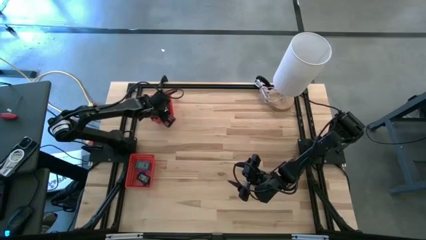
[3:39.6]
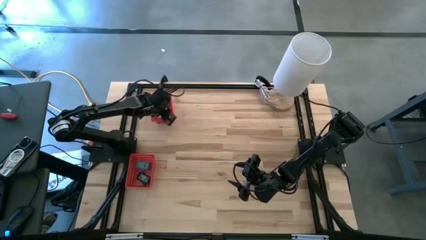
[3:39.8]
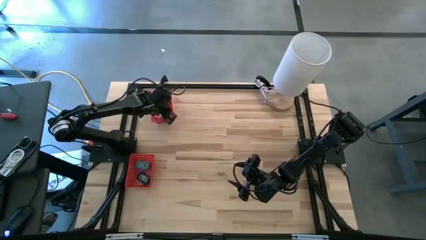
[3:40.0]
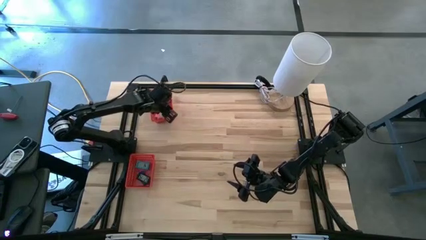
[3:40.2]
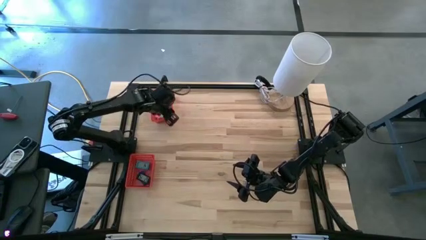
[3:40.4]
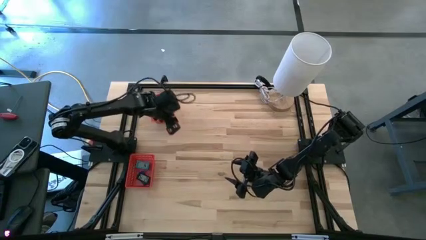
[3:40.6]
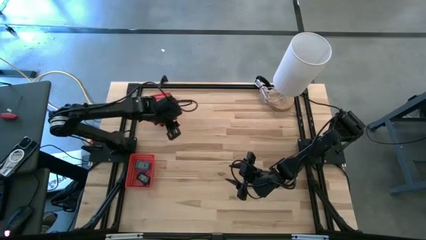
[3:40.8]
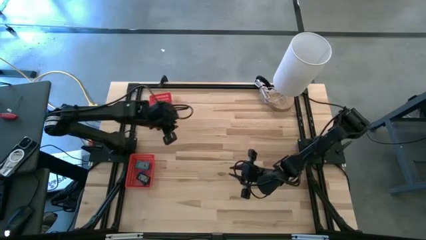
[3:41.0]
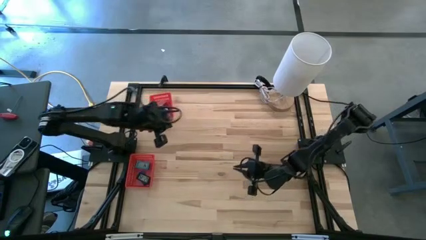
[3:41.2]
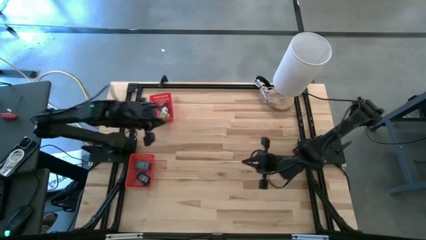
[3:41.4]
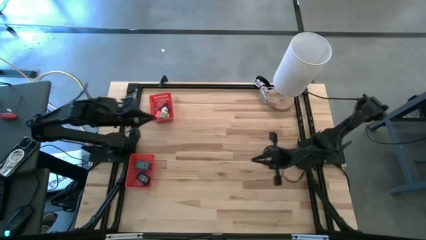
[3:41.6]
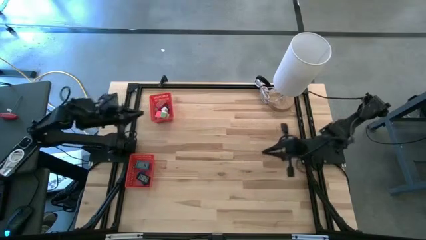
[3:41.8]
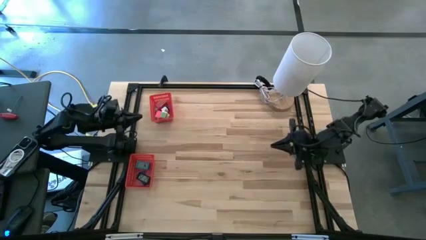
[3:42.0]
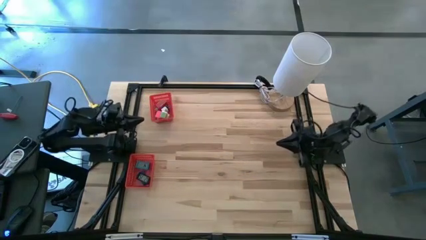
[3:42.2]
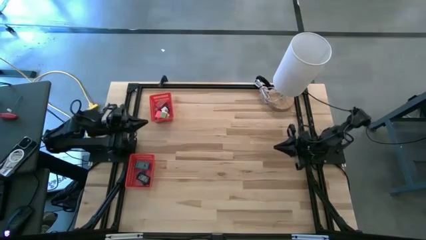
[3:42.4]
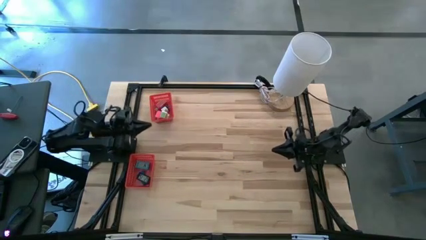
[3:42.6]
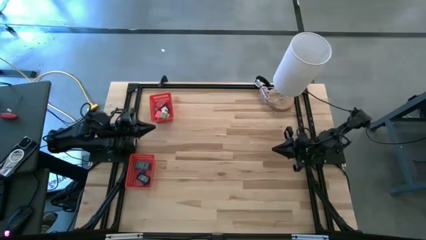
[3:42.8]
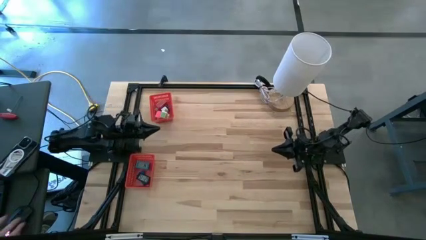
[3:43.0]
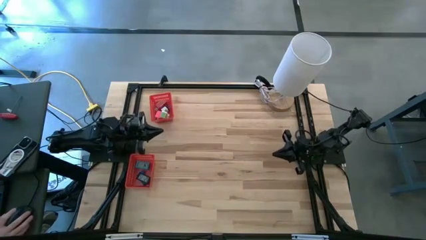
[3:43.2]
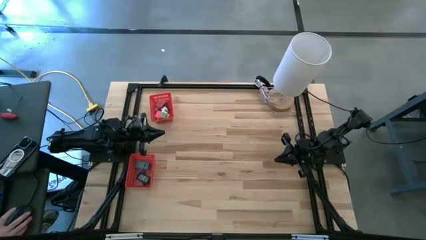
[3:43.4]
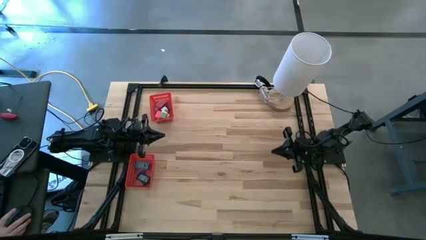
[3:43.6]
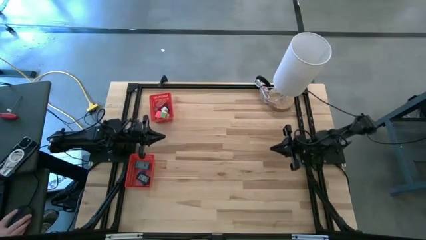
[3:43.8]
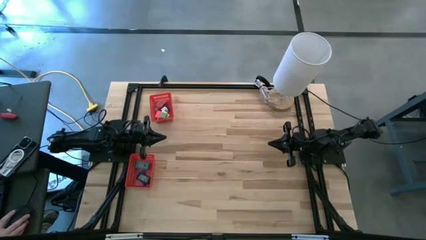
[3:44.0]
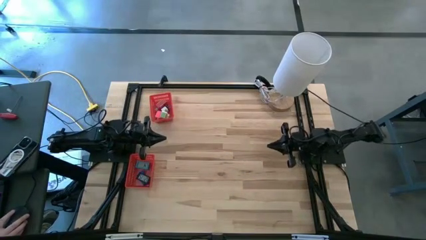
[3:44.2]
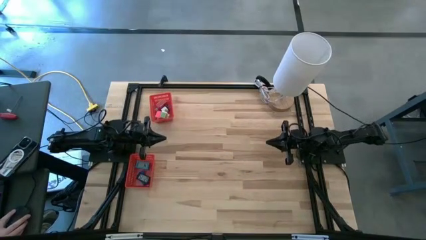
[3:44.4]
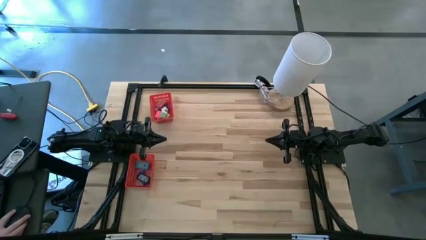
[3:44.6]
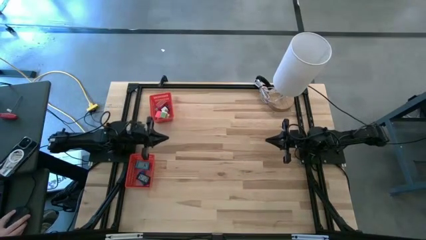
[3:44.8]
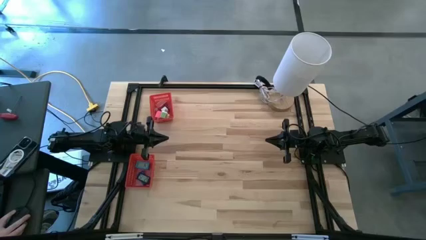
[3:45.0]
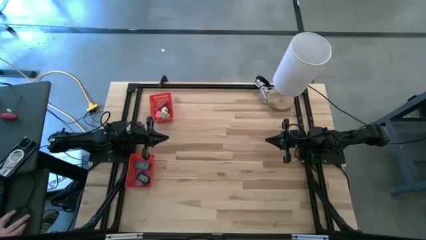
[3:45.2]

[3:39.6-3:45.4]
Task: Pick & Place Office items
Return to Home Position

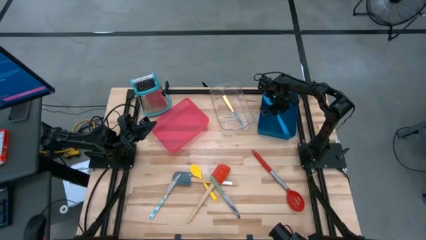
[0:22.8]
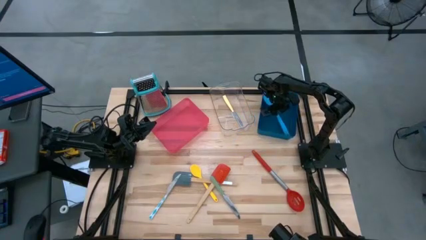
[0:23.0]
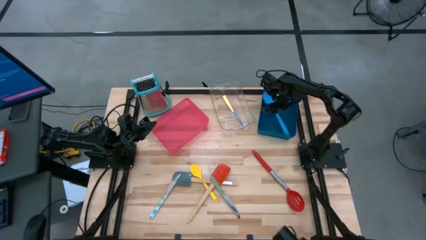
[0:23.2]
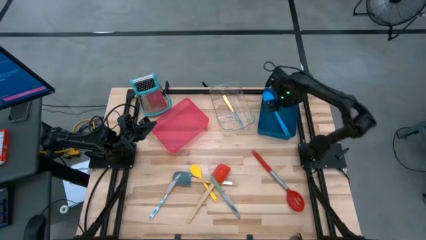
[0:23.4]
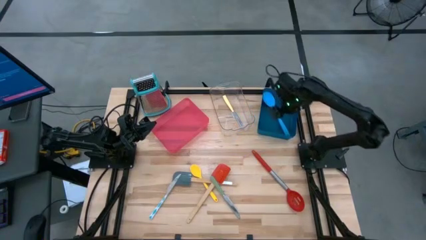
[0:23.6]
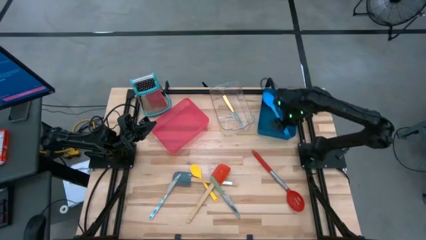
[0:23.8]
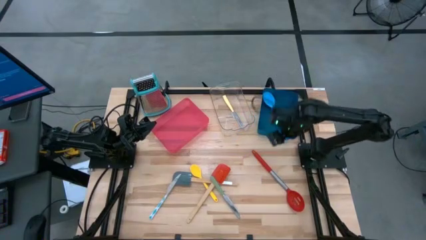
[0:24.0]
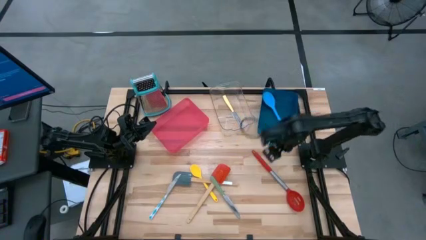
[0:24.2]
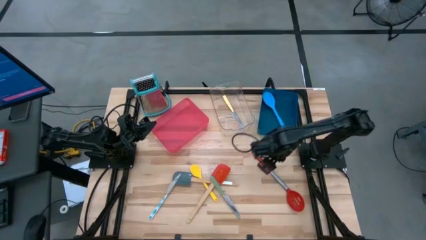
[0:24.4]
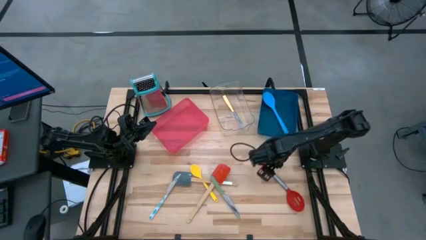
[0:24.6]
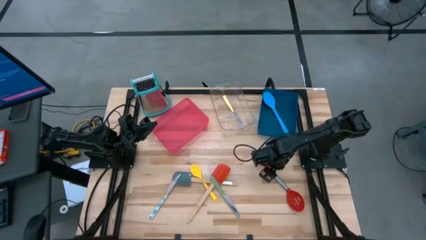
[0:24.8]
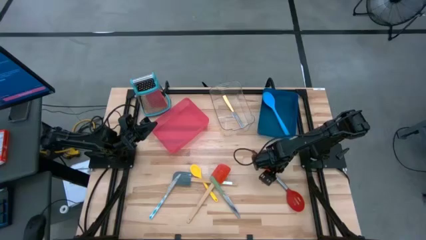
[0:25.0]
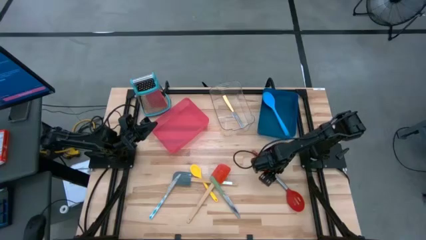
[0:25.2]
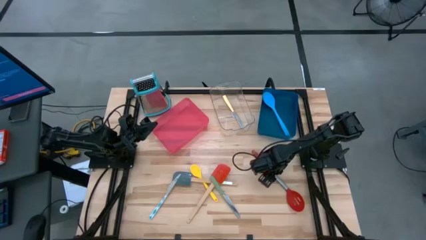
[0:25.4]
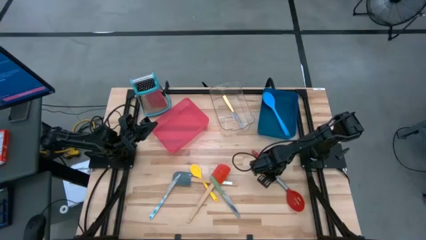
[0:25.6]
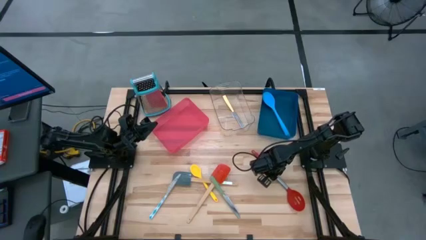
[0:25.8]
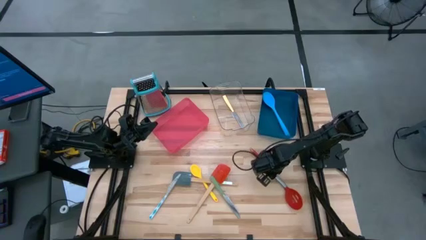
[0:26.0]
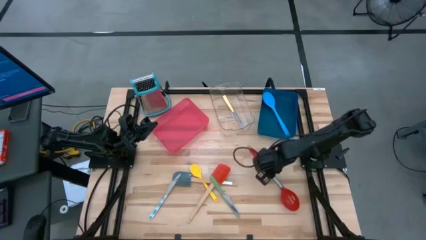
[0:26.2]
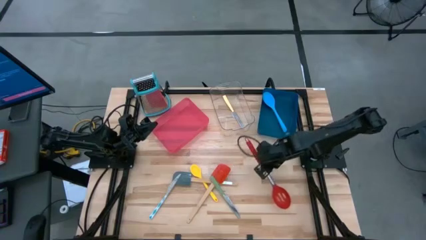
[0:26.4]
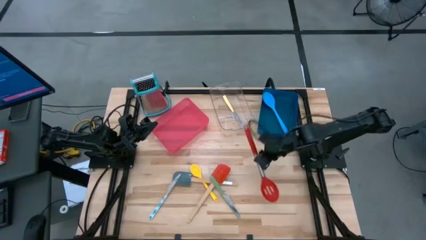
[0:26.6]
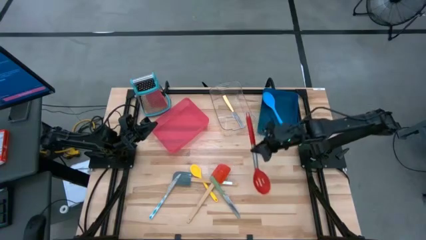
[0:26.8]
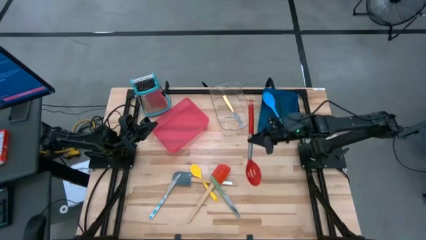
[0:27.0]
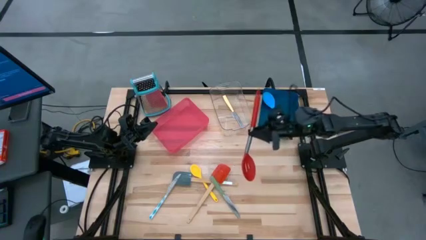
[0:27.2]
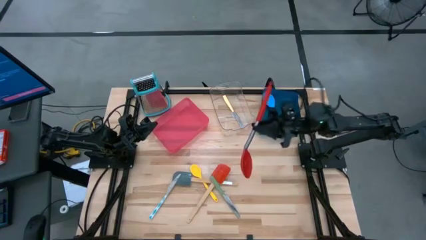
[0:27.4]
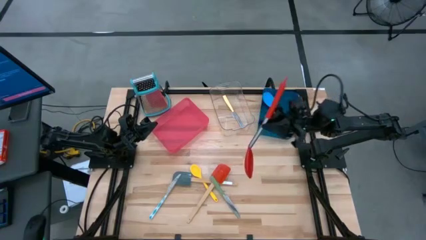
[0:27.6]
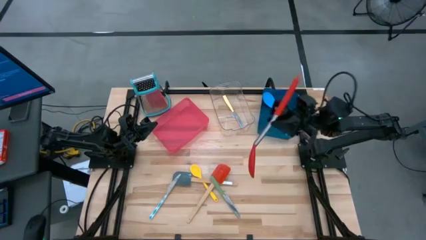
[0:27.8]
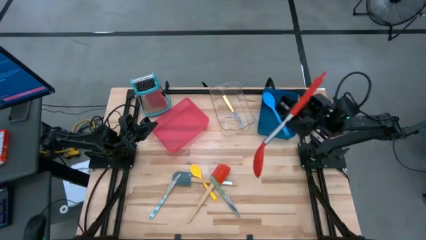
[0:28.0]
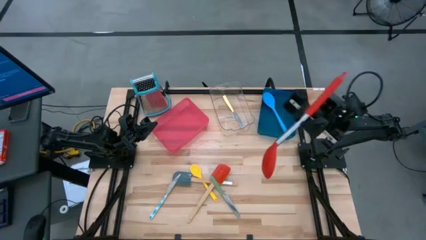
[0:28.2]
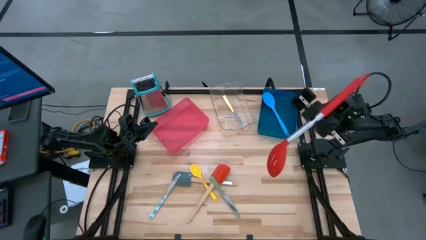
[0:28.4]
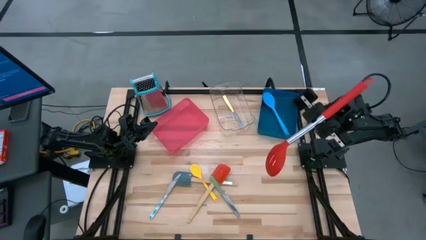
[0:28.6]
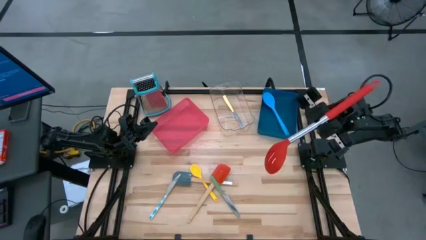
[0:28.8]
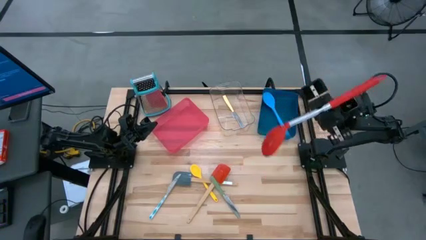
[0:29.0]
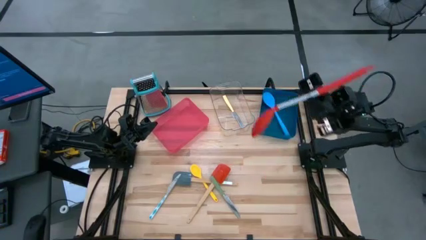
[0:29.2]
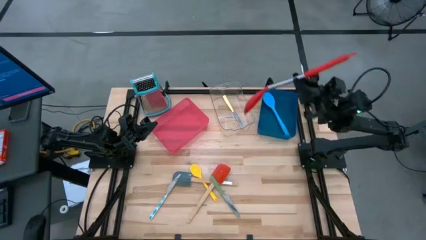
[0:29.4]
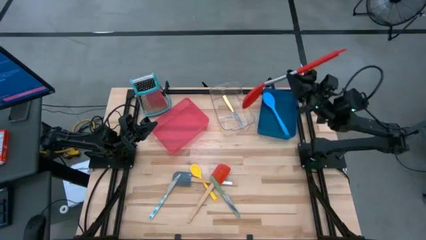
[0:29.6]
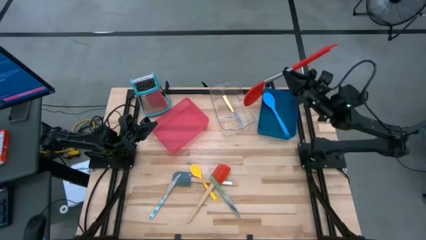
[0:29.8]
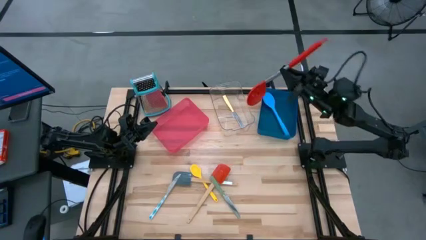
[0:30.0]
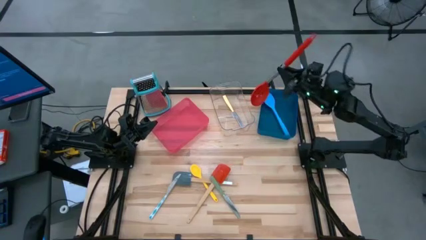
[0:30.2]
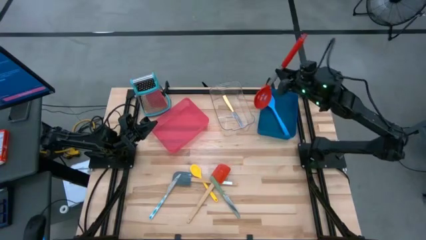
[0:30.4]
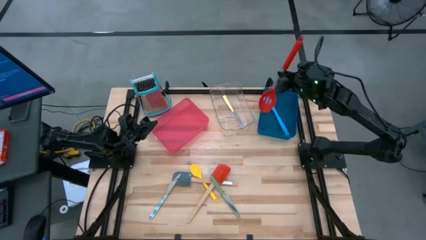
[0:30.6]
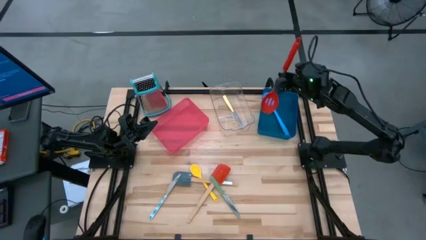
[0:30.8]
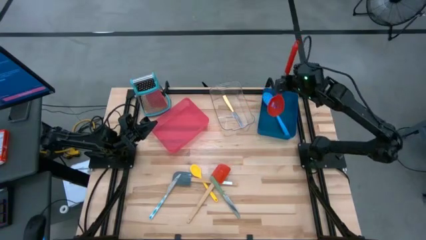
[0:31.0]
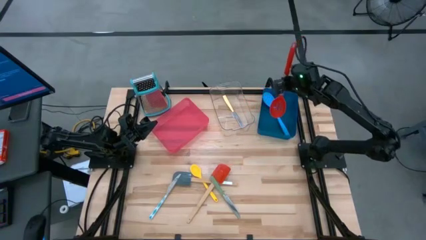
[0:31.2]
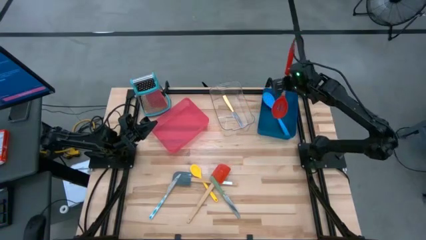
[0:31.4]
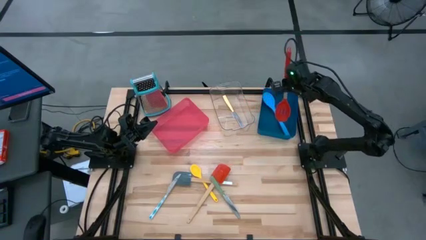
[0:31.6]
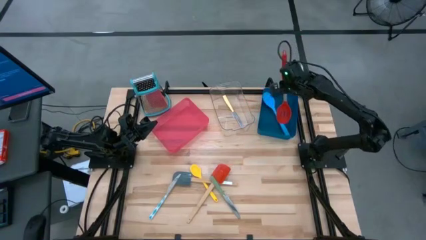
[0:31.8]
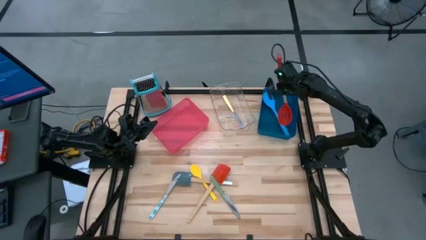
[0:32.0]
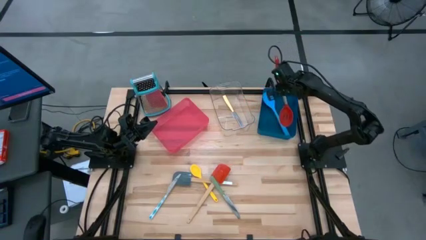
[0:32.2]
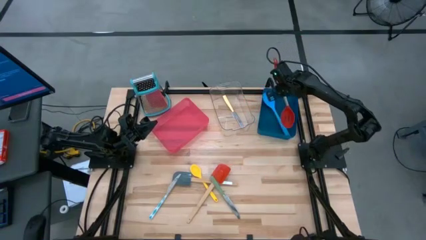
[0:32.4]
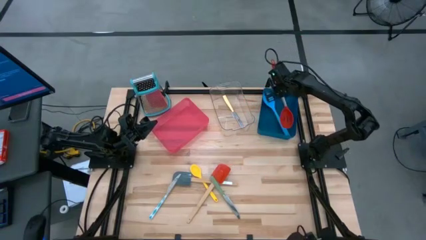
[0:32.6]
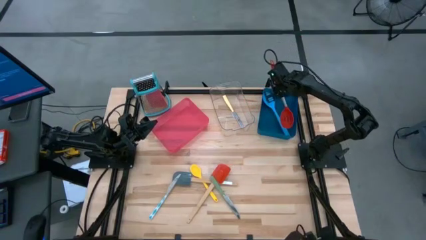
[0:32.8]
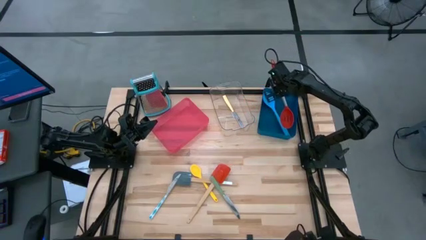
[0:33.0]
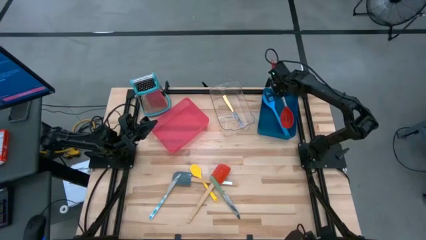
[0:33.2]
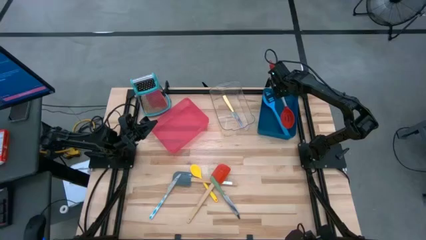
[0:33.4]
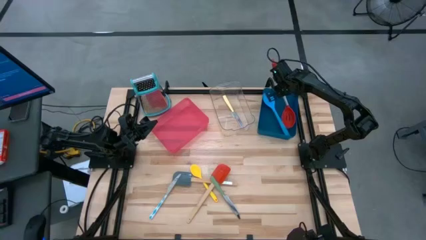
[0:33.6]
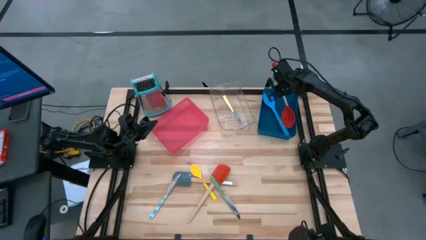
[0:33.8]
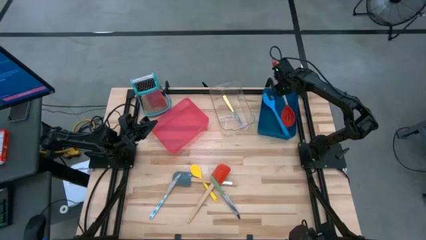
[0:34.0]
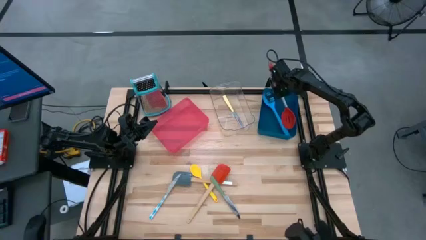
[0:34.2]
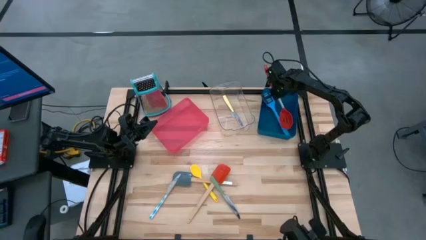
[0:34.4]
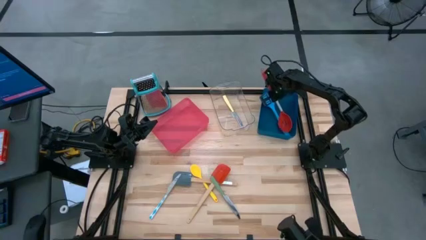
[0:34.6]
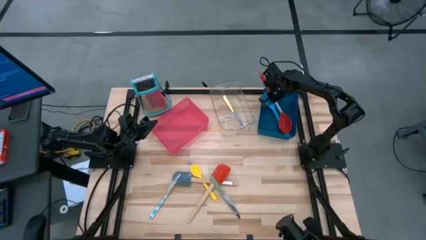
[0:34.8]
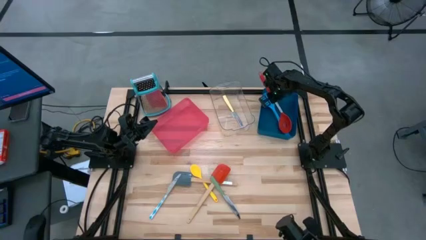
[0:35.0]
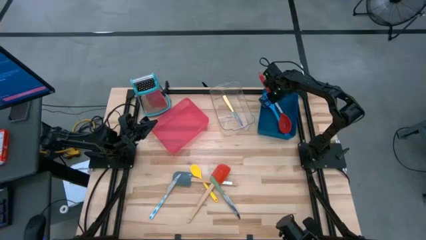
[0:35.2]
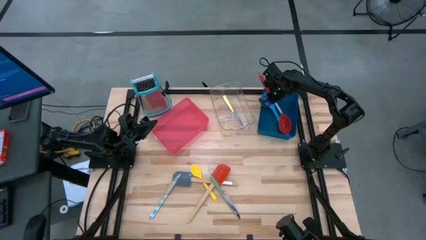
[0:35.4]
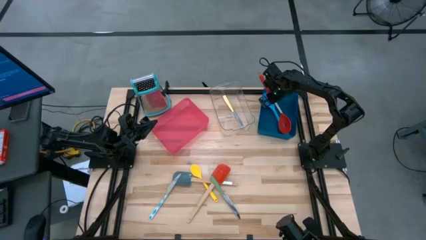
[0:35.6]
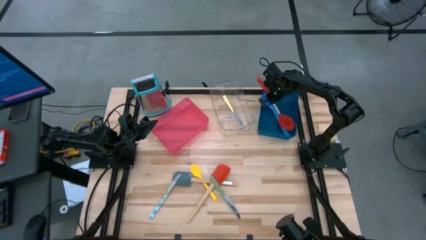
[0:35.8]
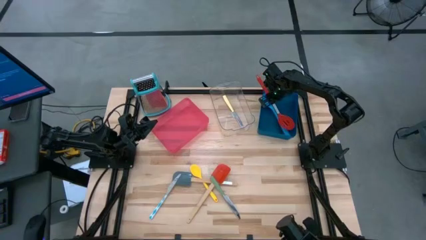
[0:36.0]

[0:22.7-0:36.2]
Task: Pick & Place Kitchen Items
Put the red serving spoon into the blue bin
